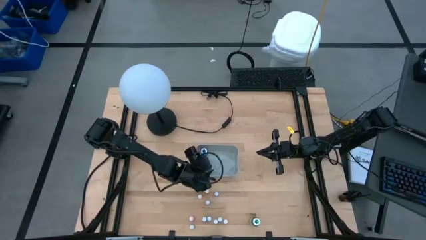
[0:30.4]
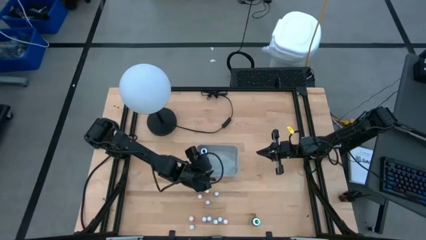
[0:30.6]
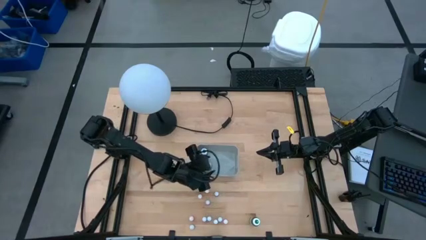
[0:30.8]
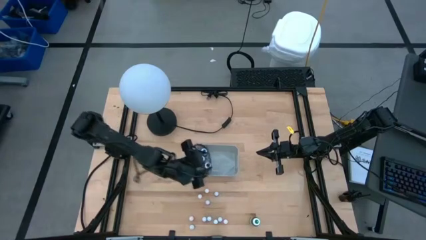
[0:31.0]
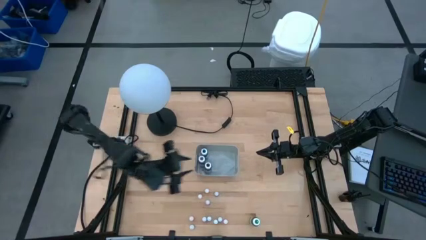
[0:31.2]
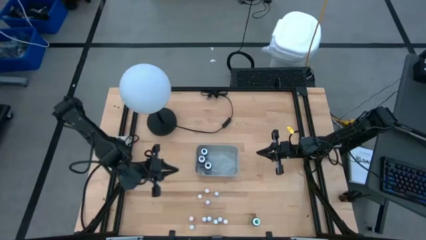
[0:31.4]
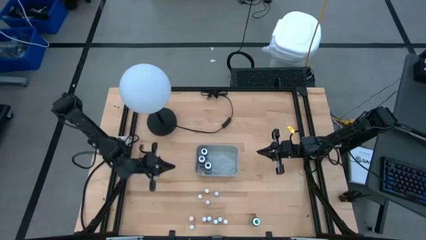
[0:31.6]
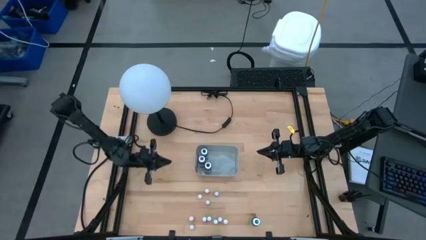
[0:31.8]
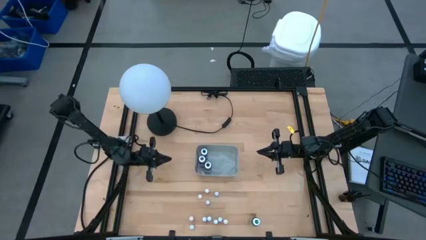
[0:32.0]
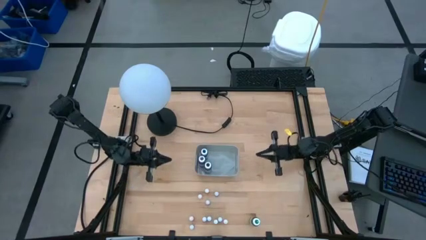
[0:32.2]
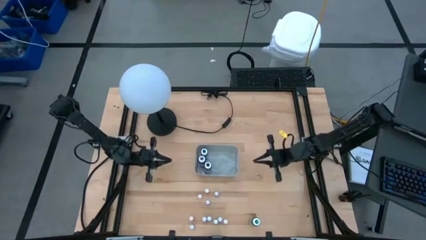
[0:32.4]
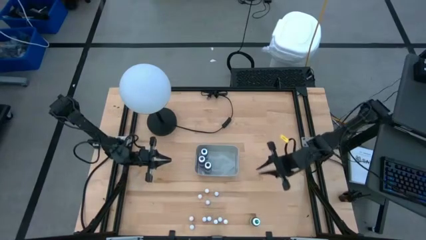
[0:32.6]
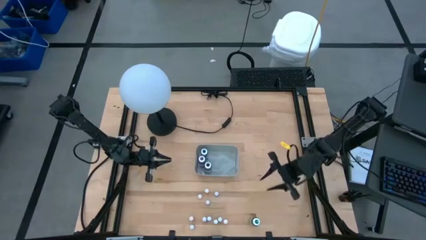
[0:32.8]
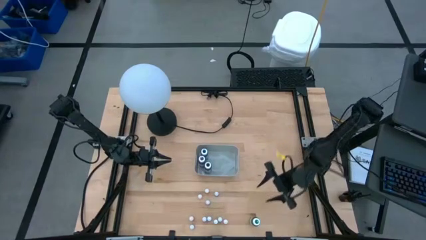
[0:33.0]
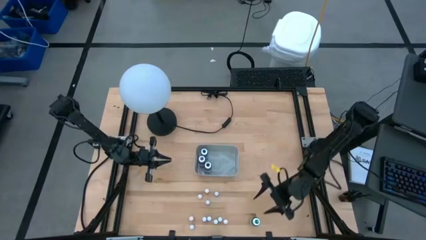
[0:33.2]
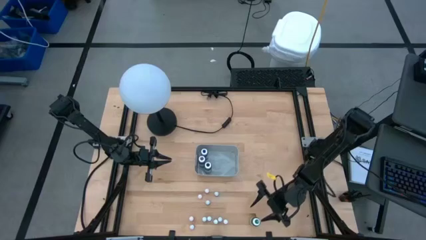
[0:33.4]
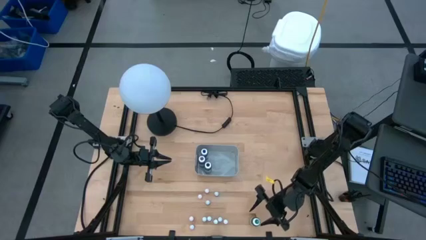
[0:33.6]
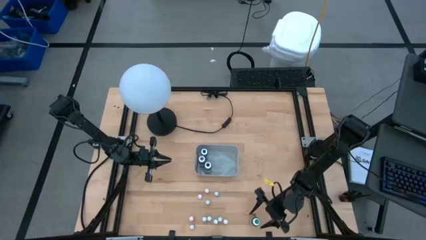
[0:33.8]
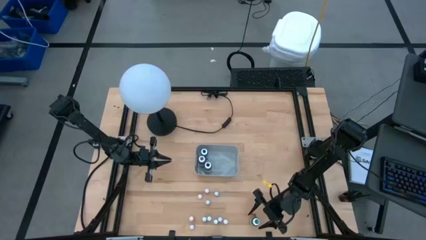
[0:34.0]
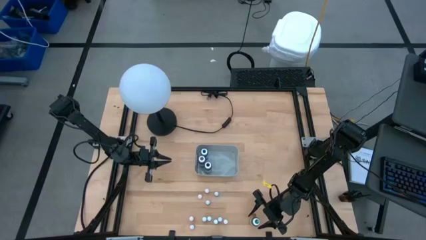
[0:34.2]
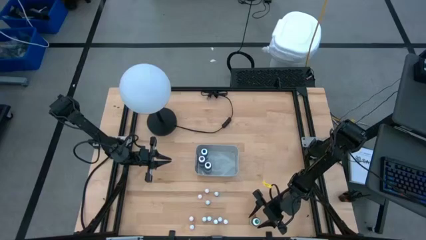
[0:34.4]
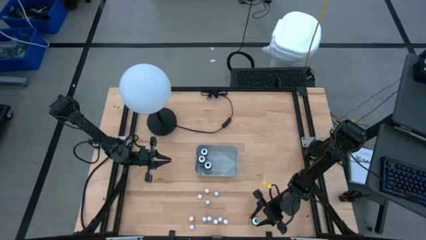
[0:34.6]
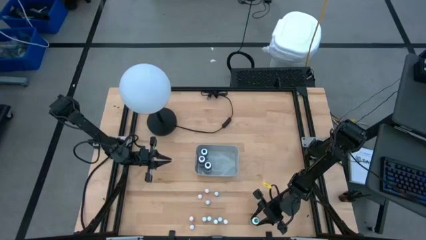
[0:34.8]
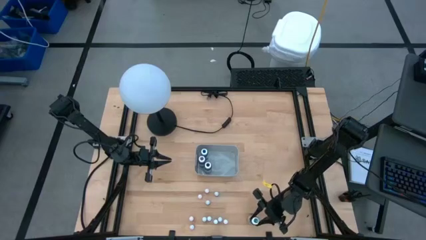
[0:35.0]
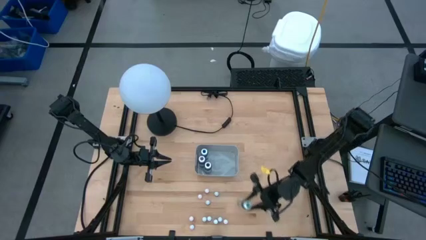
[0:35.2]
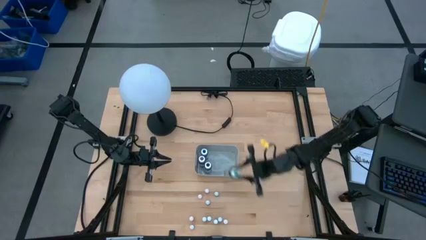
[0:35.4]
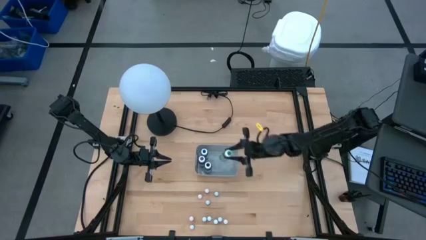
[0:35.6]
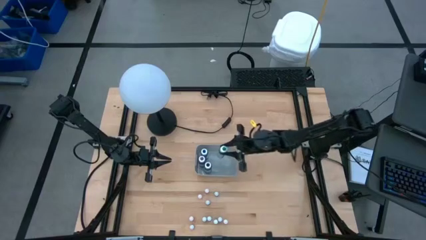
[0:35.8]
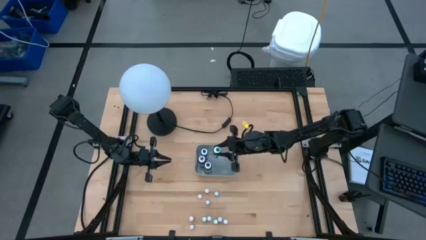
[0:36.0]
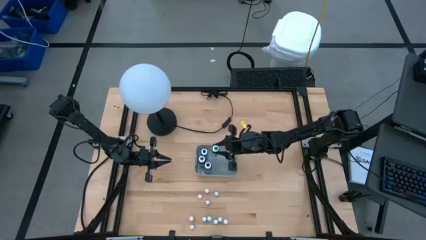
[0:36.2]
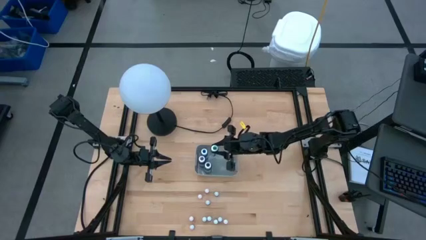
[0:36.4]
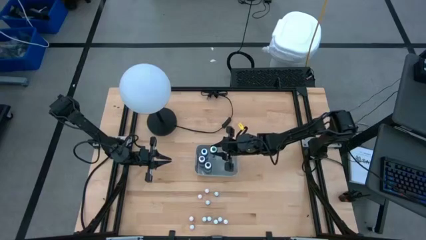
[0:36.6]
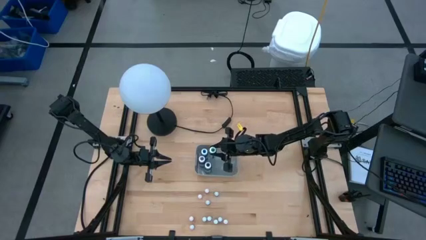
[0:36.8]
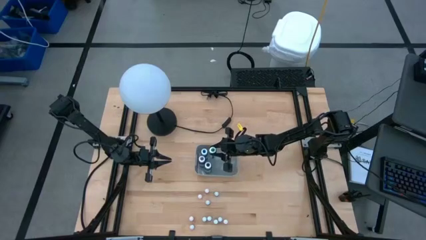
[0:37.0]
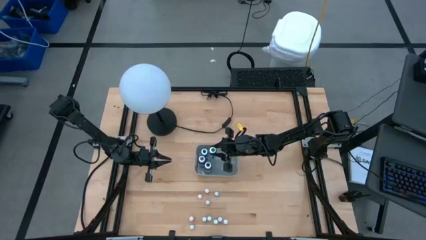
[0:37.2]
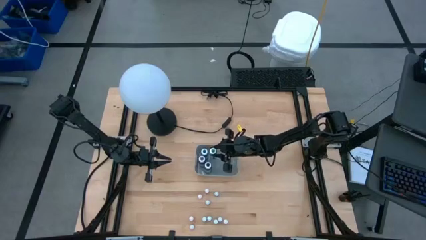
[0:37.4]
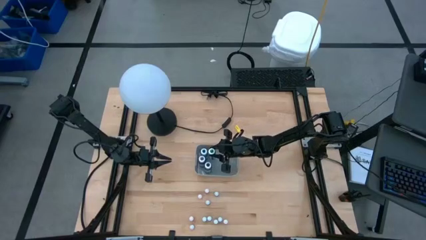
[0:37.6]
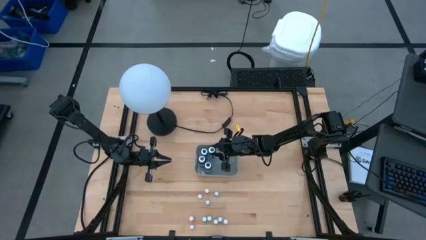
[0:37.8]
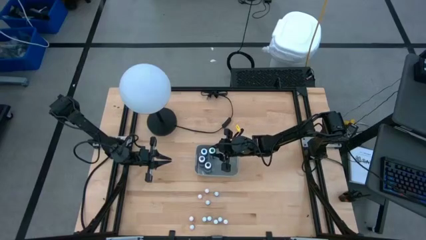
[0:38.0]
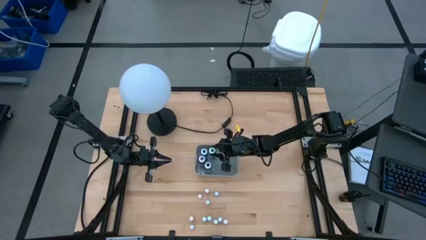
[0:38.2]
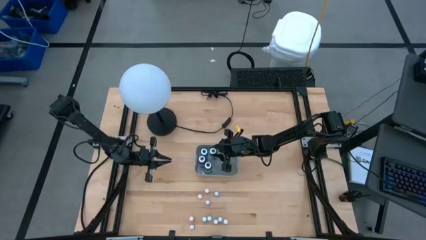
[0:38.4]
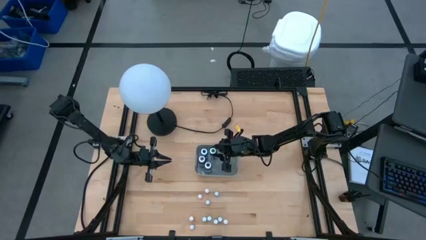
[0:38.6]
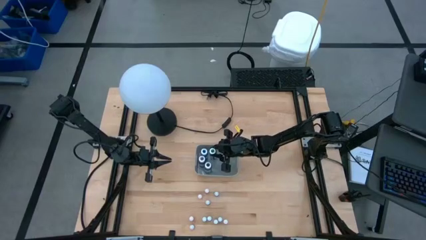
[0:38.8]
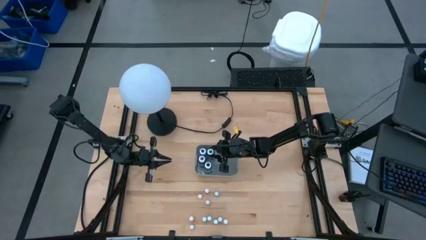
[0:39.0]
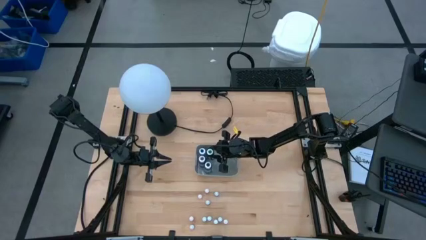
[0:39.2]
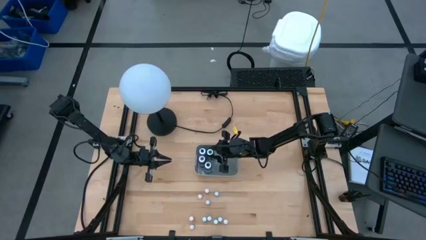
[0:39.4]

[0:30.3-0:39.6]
Task: Pick & Place food coloring
Put the big green food coloring bottle into the gray bin

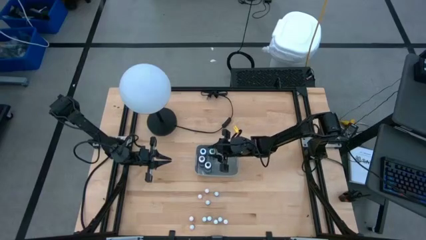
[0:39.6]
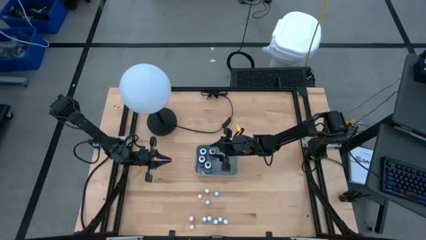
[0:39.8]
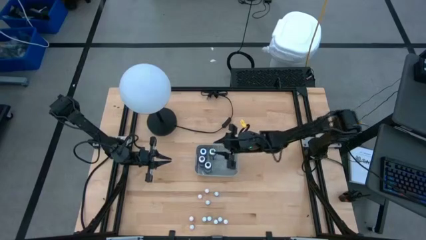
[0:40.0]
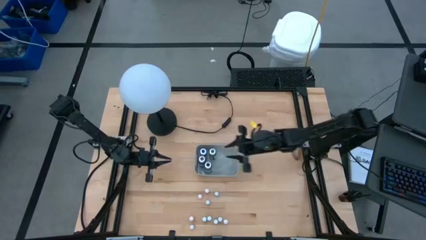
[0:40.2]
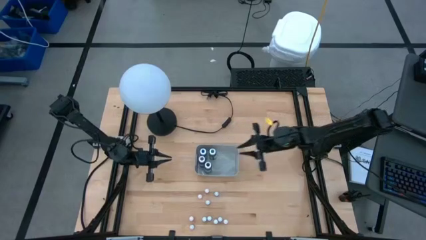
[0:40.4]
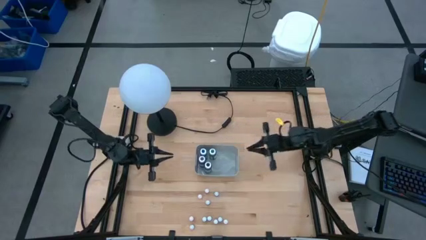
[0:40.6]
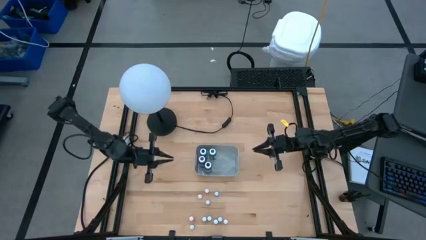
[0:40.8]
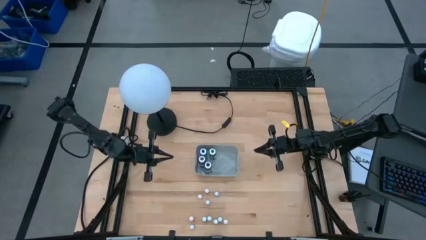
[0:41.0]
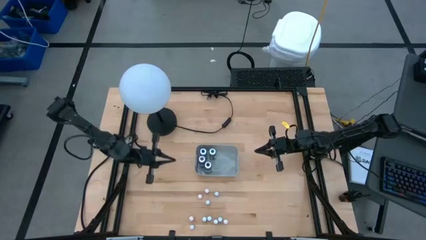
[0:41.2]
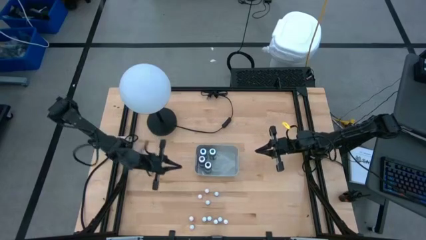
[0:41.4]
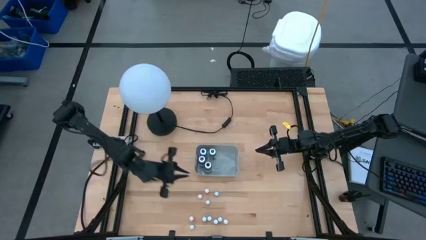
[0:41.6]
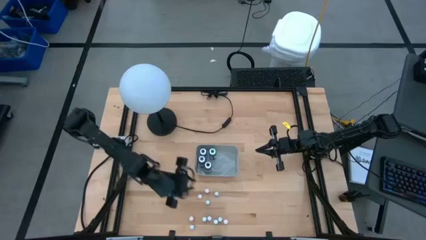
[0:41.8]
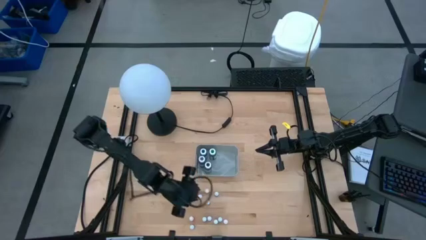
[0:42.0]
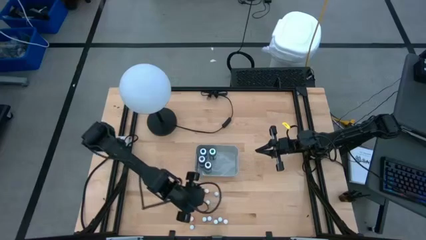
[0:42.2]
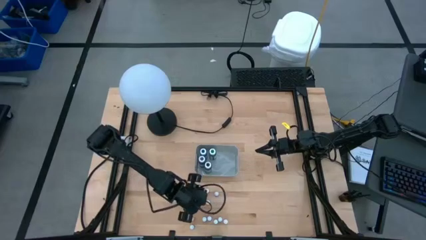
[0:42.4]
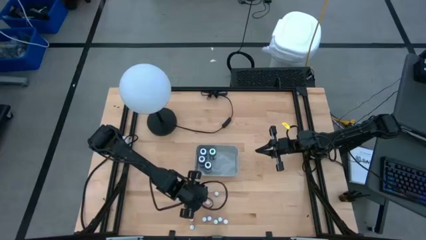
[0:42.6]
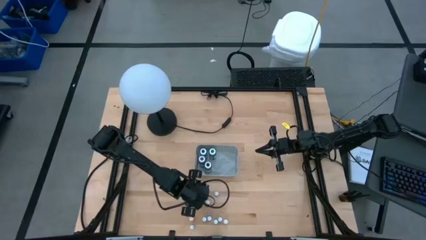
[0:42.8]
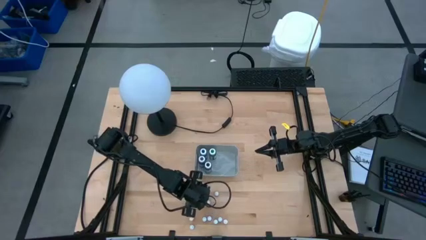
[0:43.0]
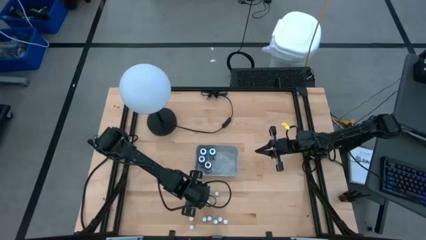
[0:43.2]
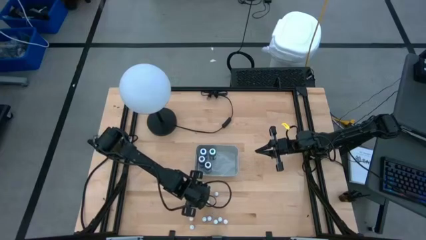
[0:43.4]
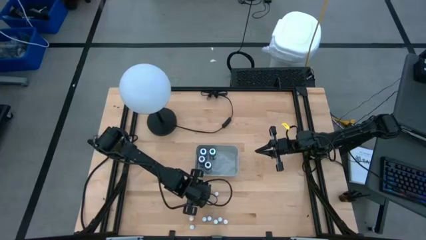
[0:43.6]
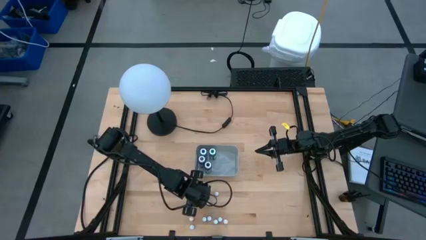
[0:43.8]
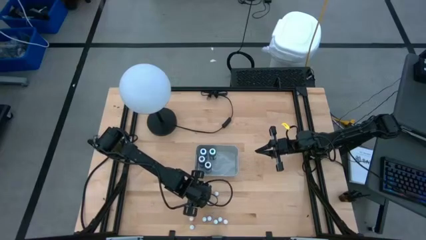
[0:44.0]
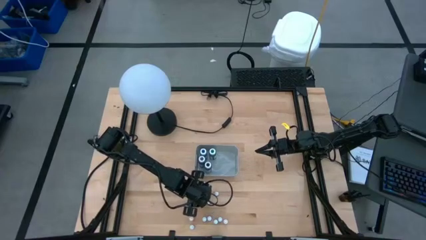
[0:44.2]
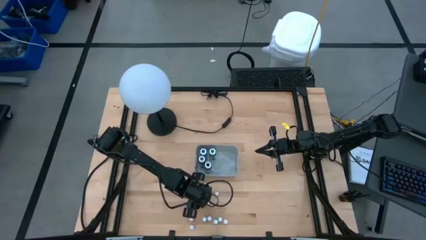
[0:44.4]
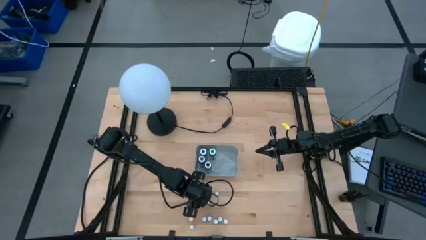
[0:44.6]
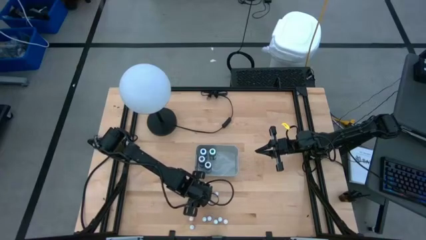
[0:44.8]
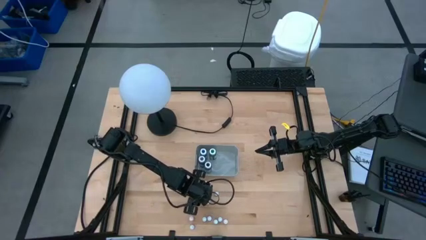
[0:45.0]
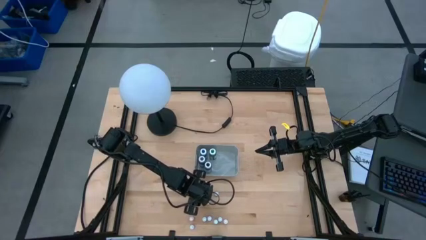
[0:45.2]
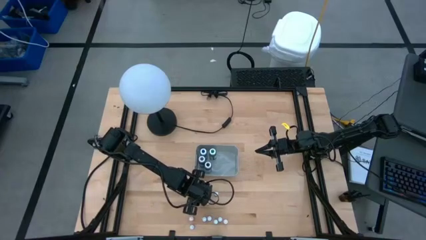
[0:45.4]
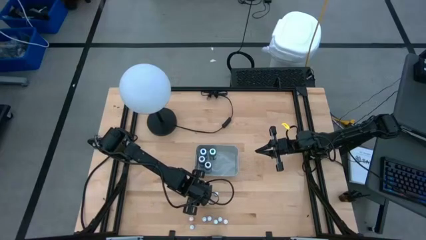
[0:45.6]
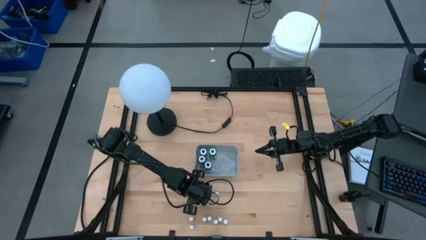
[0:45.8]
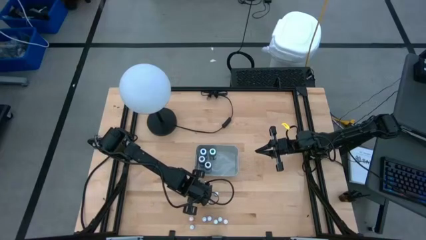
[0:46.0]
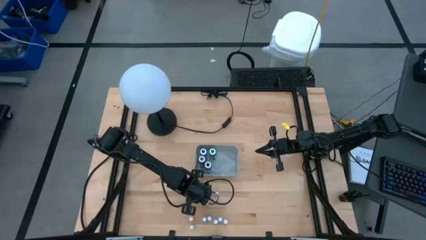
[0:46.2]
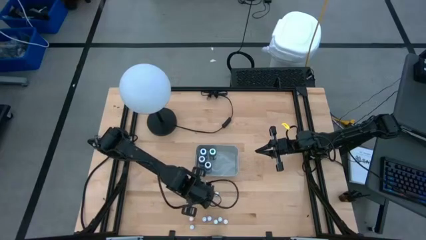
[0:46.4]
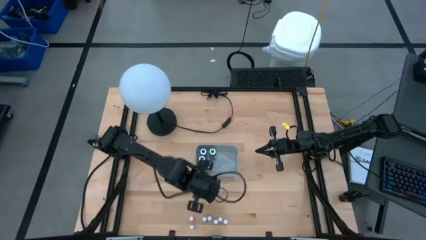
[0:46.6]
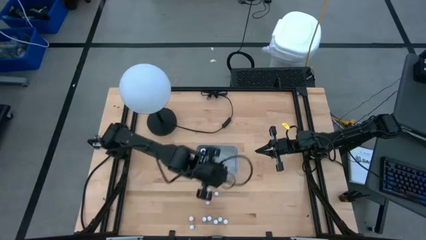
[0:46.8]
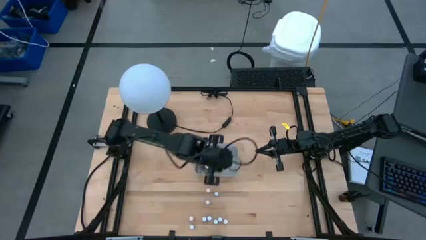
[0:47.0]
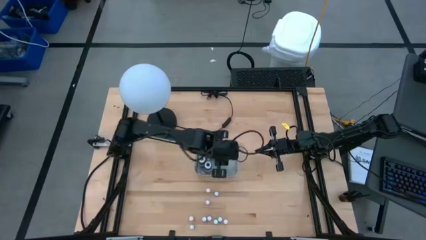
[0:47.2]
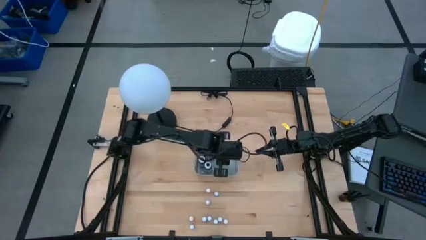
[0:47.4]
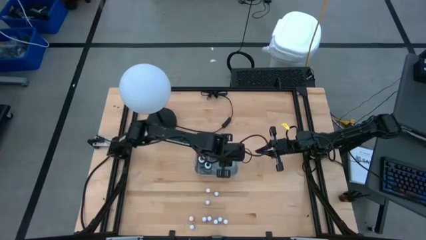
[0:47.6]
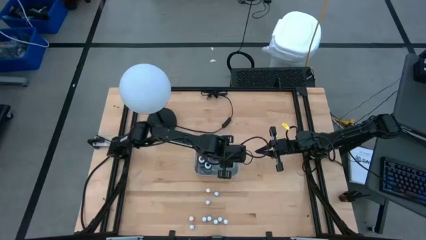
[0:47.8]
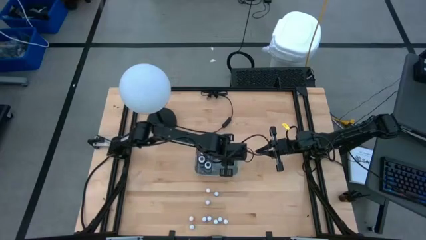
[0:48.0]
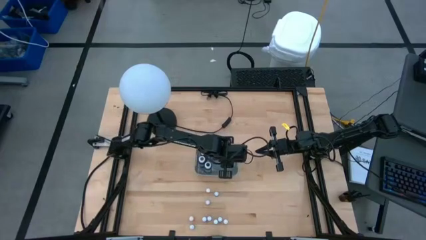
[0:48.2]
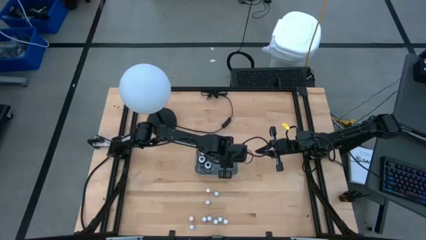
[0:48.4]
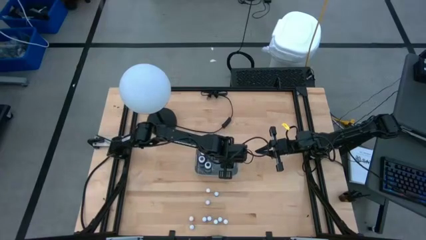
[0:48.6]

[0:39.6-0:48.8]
Put the small orange food coloring bottle into the gray bin
